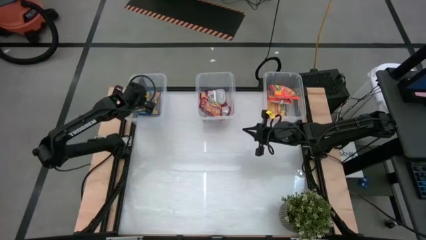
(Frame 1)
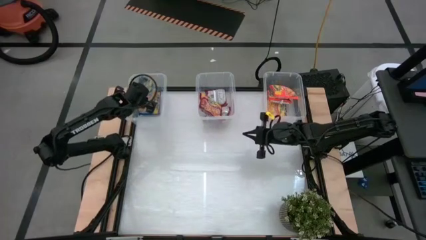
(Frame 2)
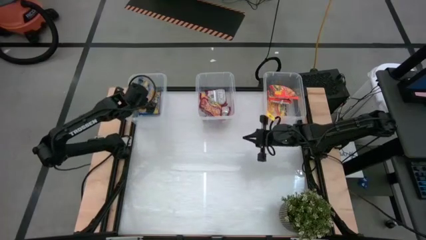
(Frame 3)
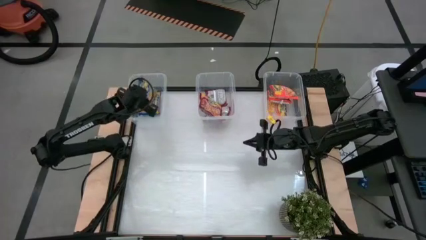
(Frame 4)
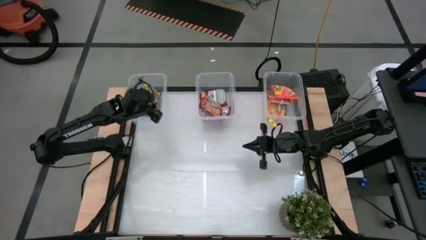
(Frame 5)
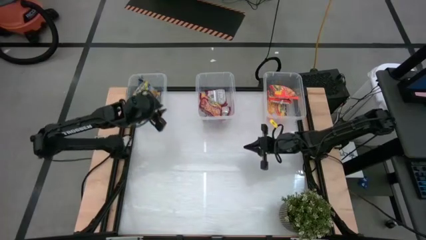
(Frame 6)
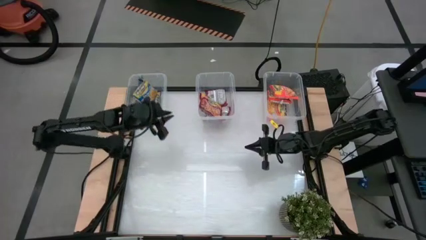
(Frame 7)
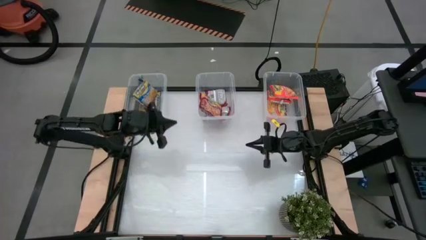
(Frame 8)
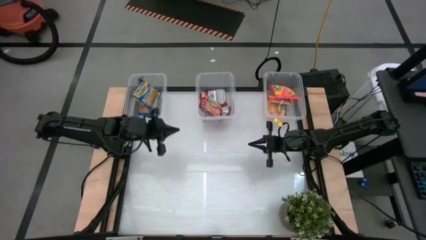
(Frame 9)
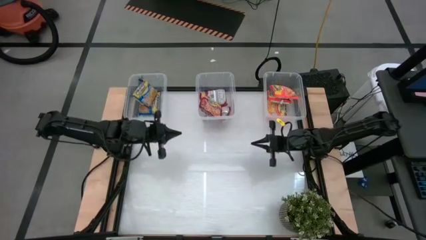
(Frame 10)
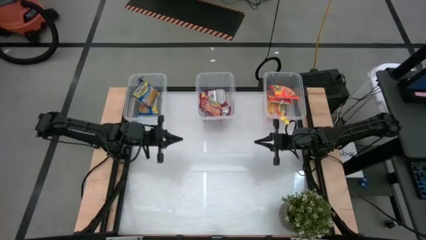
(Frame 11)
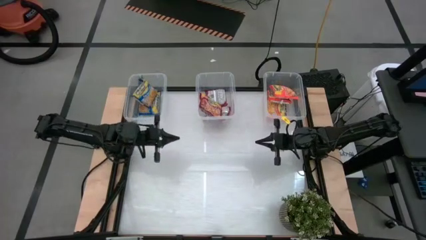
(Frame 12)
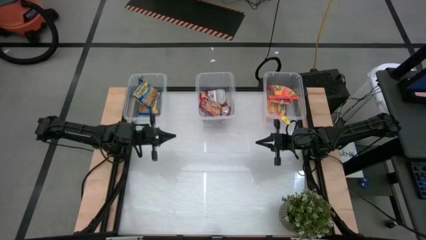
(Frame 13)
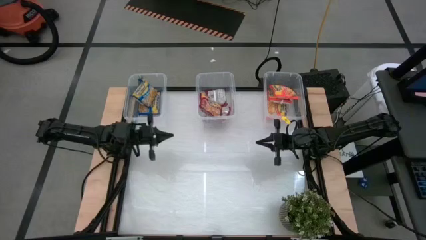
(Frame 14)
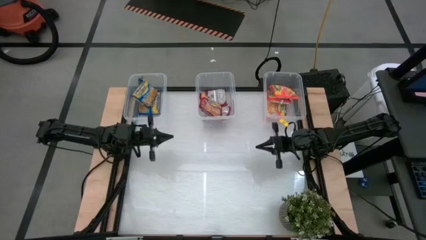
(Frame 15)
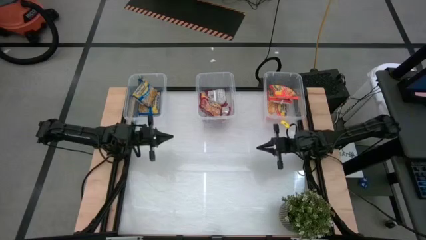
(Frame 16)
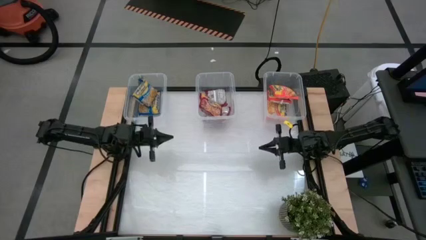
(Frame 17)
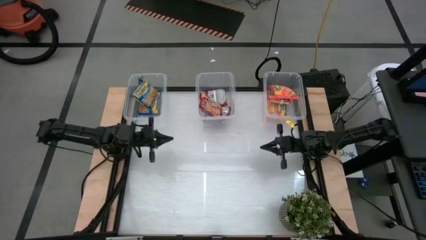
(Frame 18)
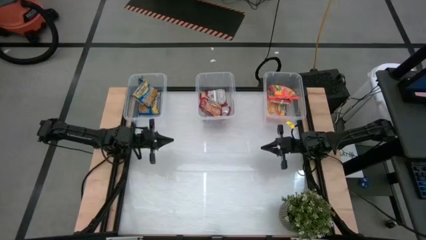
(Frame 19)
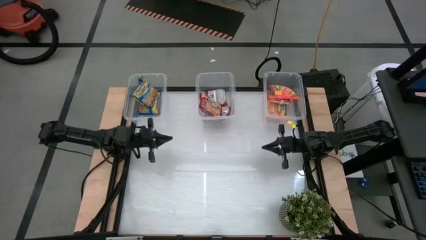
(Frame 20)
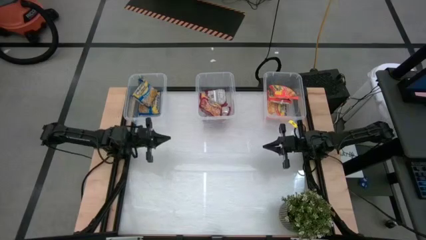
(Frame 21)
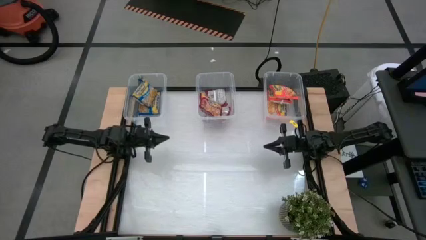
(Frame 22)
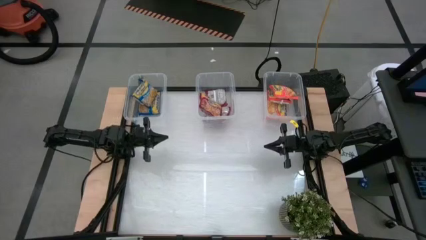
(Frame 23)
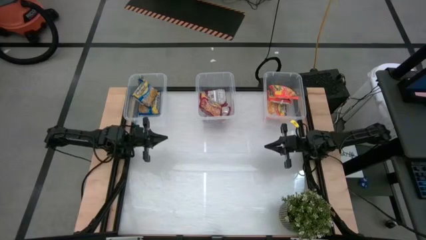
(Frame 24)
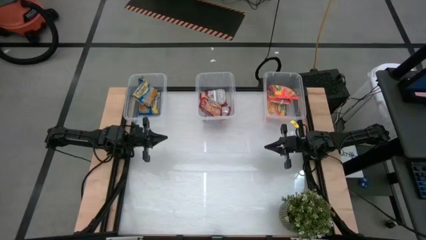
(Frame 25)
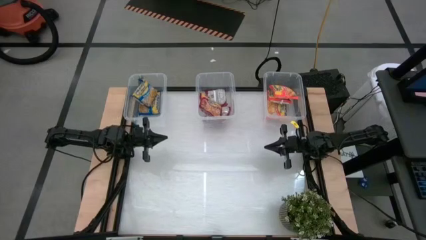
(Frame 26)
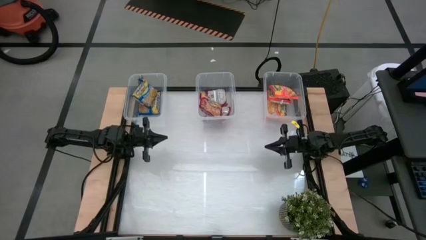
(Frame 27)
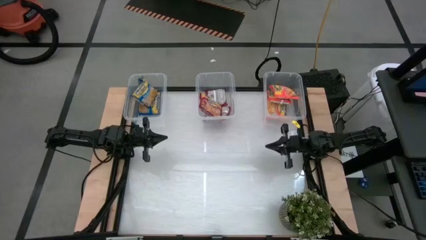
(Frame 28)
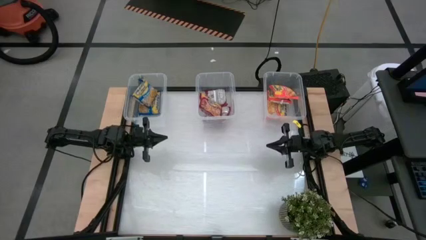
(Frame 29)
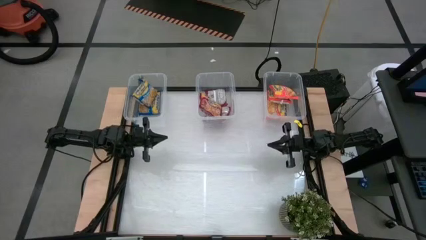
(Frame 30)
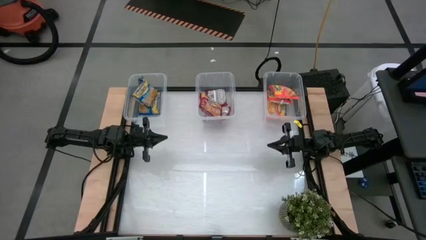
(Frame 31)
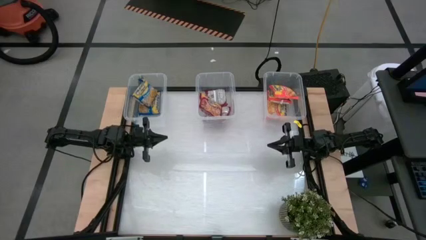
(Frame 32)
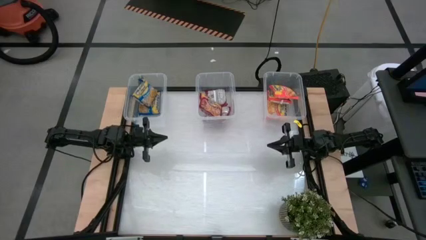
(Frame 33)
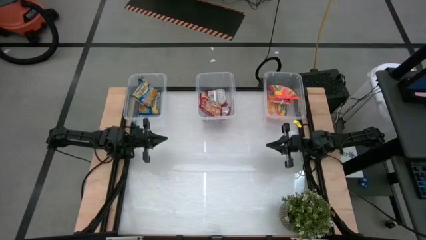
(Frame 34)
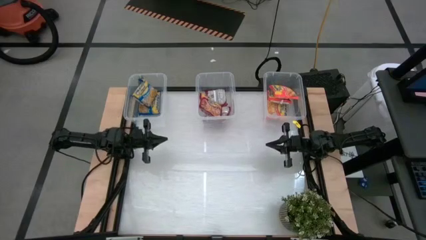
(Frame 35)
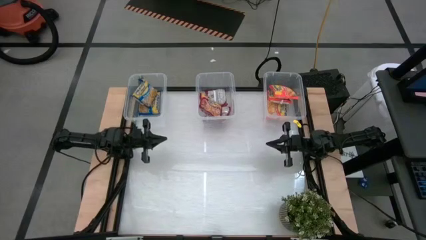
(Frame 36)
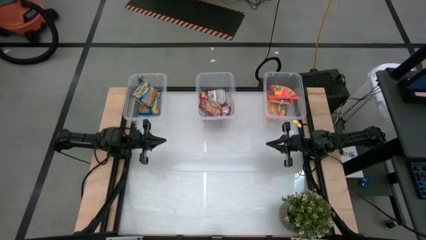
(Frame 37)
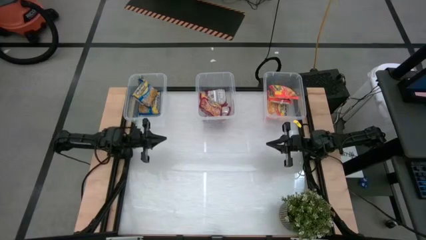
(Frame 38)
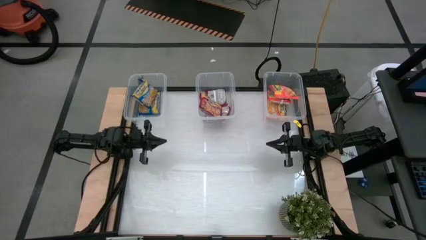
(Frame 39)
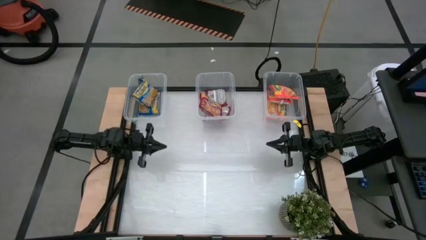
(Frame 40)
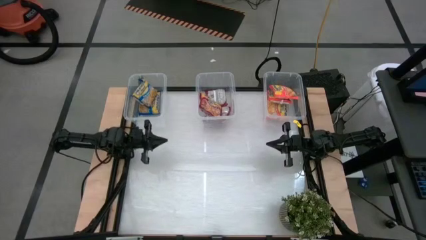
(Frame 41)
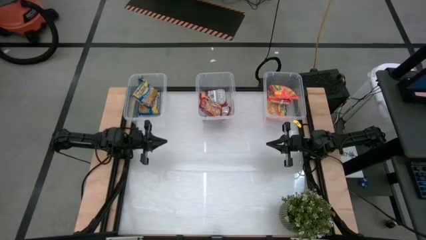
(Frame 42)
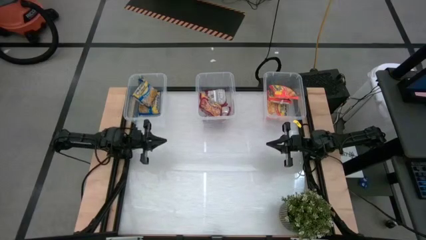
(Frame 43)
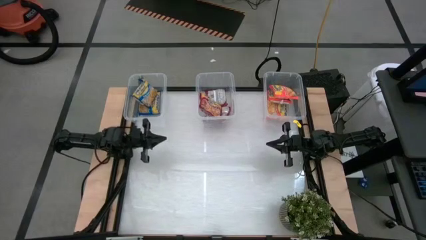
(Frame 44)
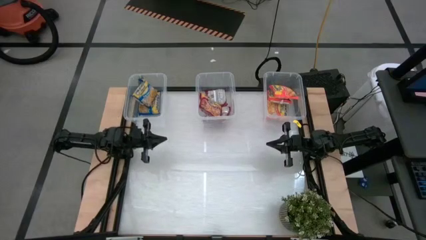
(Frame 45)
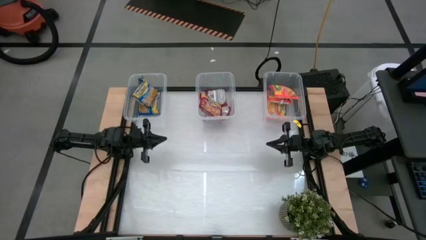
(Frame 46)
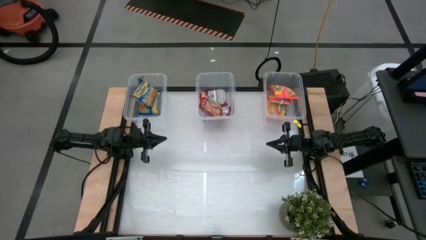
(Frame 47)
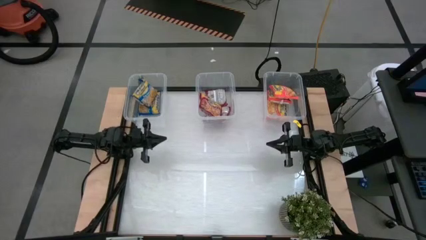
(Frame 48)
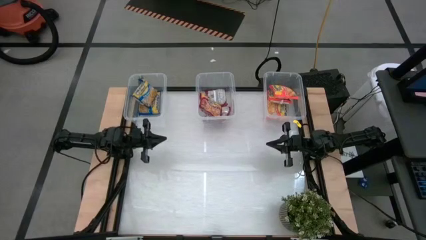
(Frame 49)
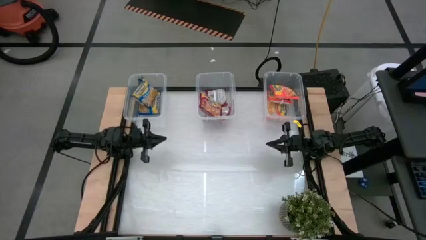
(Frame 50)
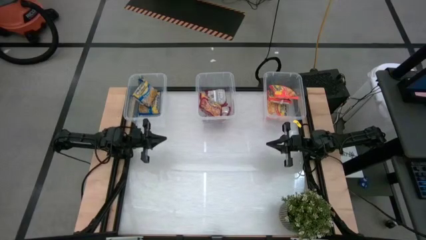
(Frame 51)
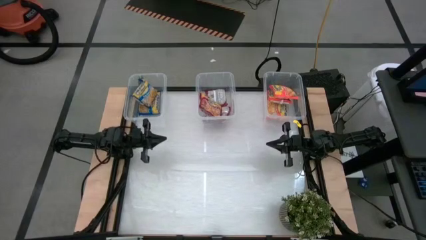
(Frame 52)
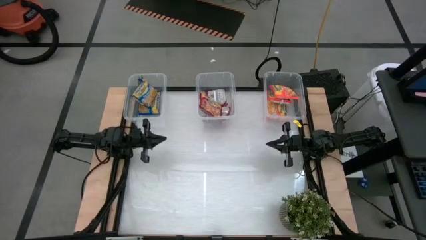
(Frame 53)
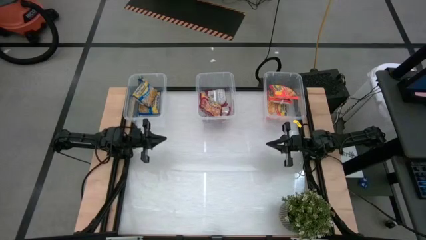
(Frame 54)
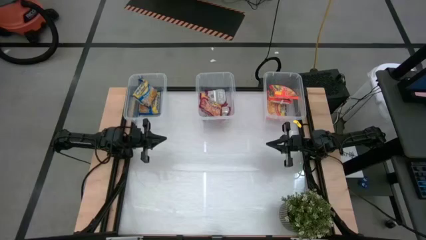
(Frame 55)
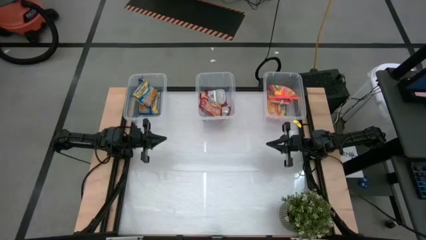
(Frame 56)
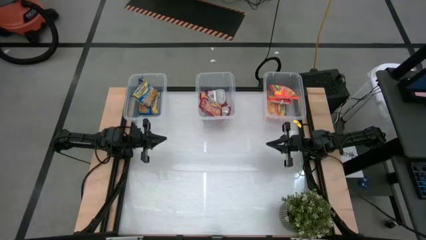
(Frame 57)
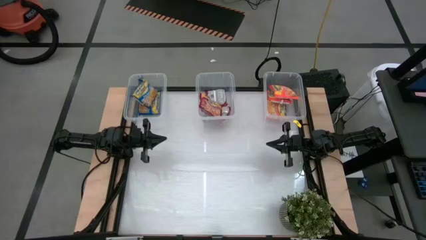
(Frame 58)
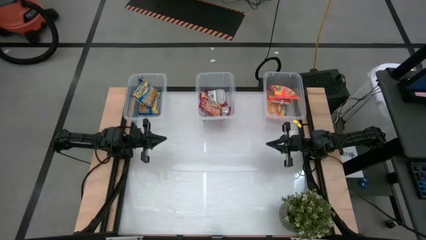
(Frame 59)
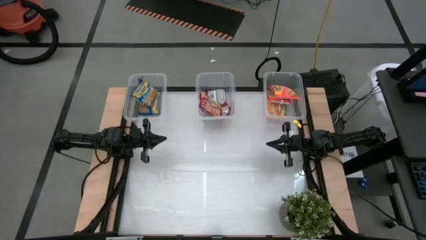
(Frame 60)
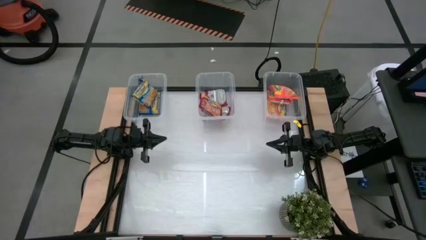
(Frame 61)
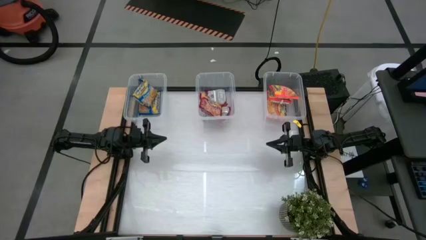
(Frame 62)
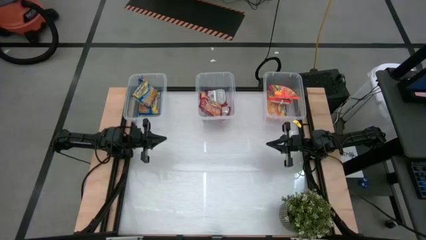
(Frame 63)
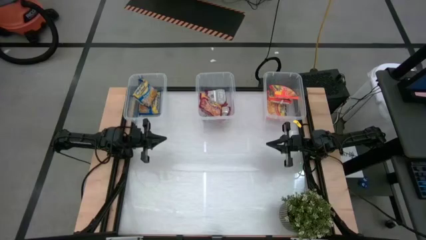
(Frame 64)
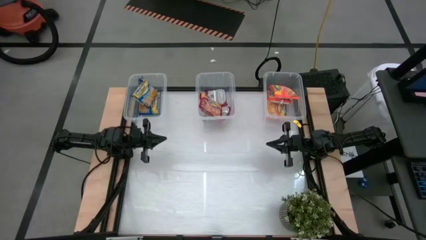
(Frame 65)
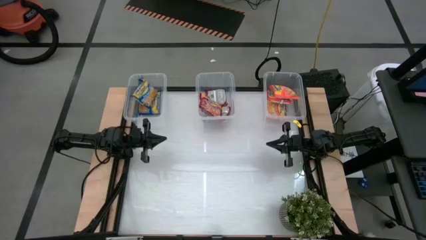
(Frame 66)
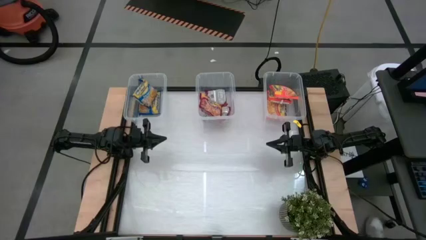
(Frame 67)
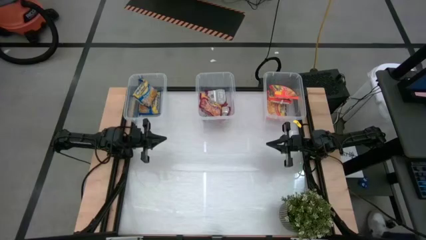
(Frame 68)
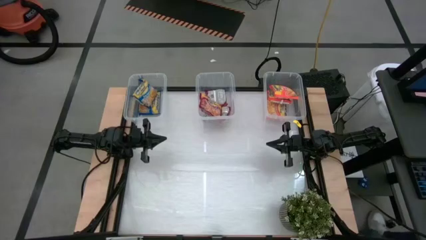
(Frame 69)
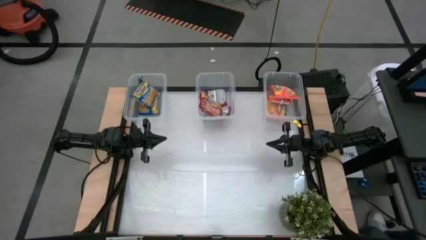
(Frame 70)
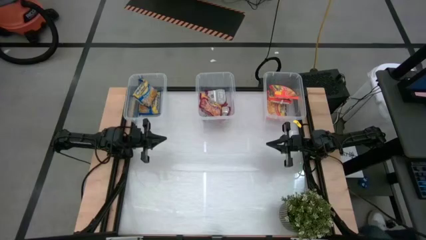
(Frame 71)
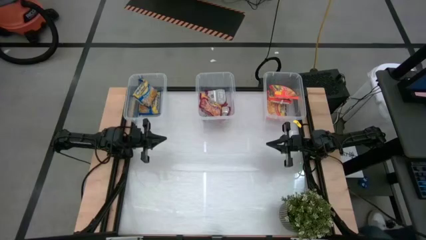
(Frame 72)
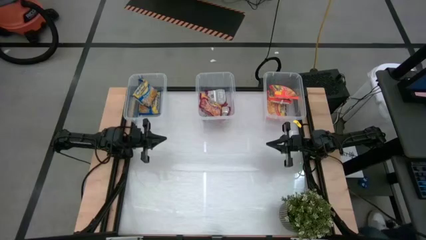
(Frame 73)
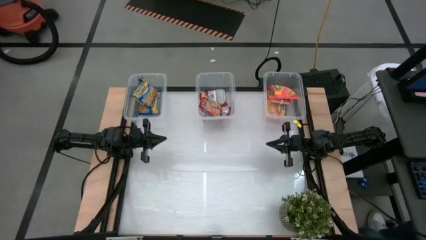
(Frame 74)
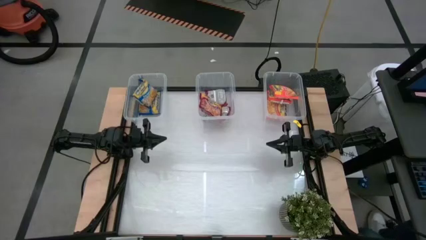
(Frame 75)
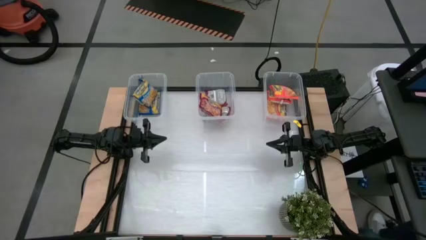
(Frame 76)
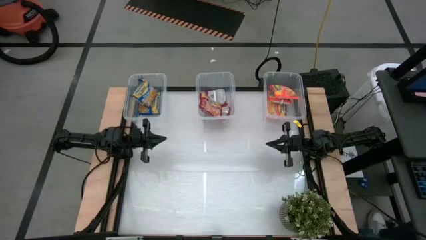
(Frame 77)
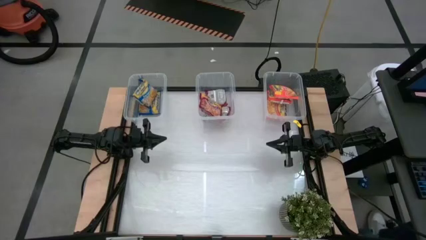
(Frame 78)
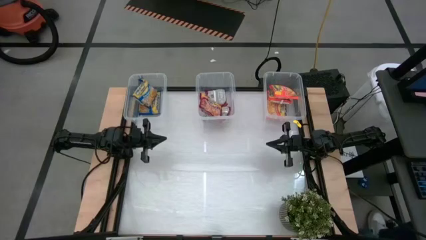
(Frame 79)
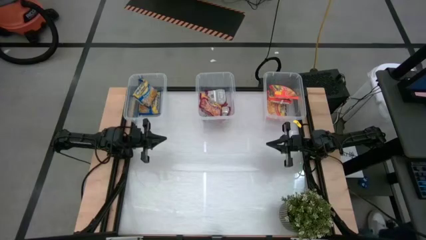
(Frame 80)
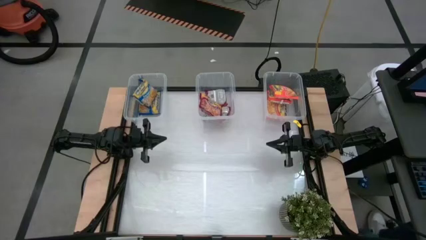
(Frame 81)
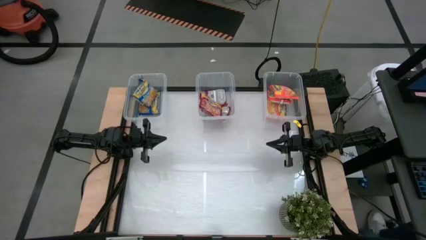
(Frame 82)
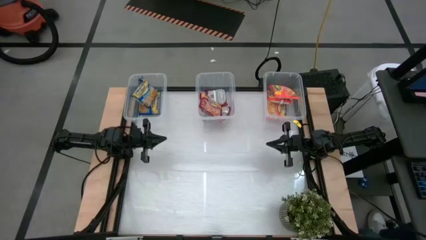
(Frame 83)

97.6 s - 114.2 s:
Task: Sort Maruchan noodles
Return to Home Position
